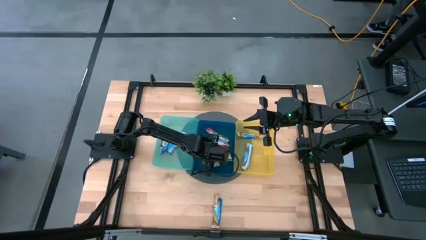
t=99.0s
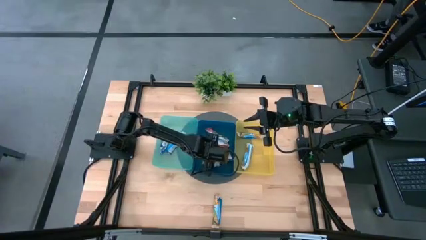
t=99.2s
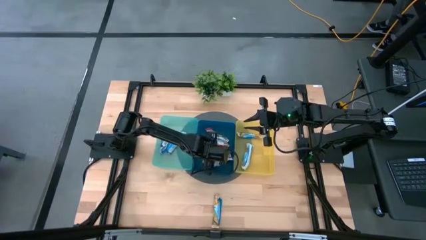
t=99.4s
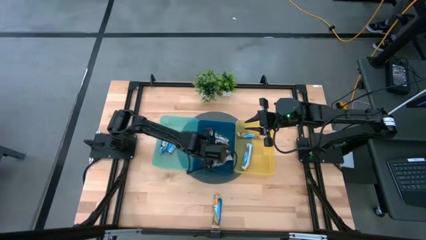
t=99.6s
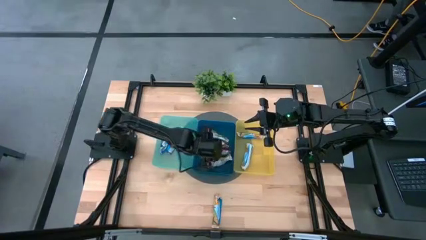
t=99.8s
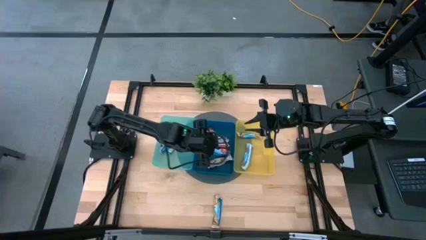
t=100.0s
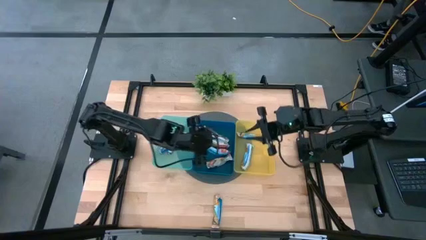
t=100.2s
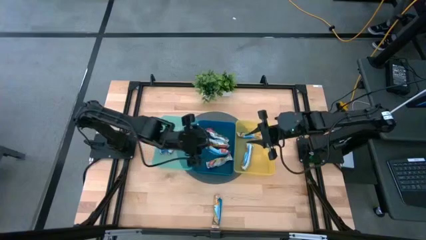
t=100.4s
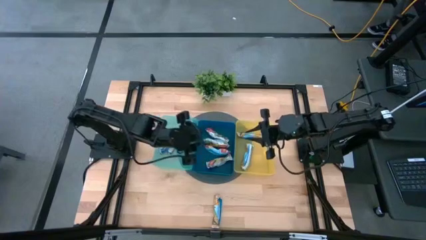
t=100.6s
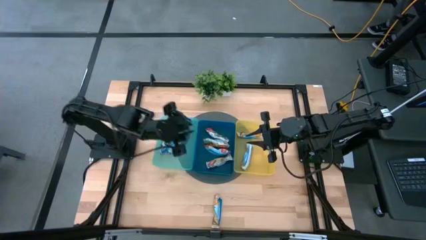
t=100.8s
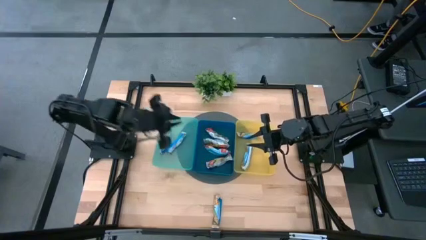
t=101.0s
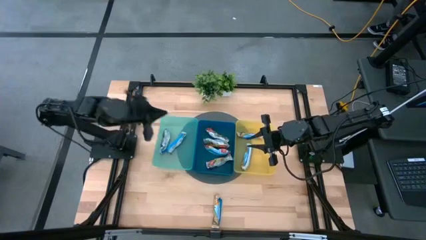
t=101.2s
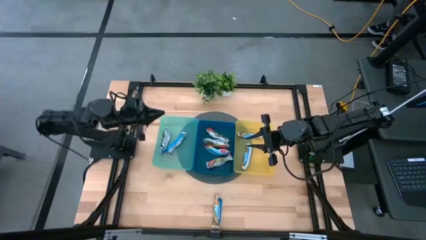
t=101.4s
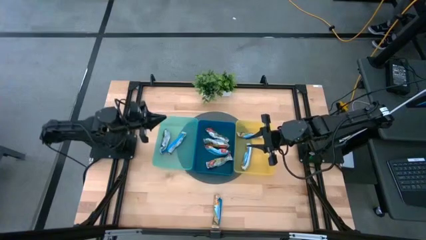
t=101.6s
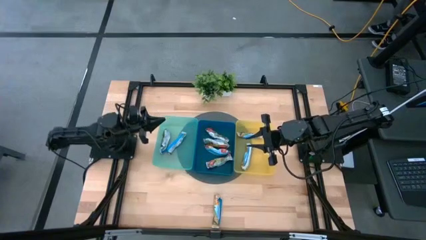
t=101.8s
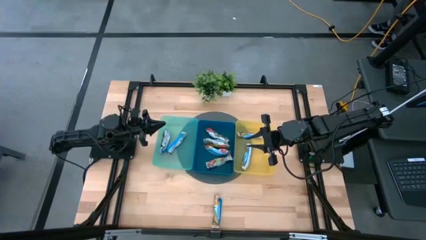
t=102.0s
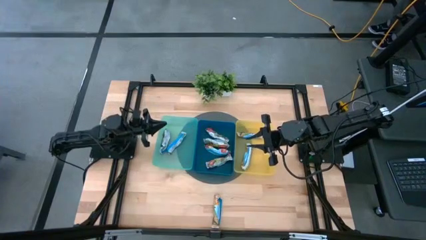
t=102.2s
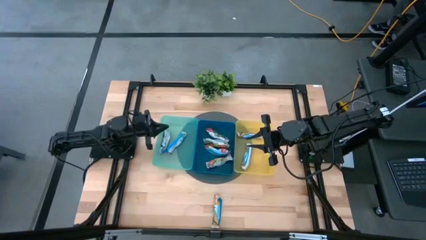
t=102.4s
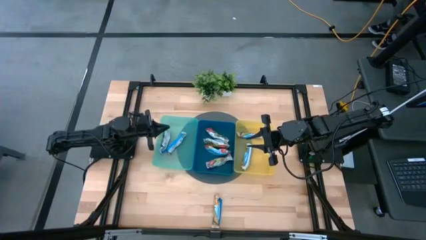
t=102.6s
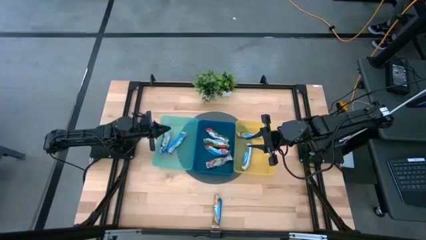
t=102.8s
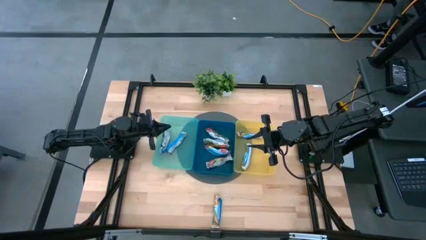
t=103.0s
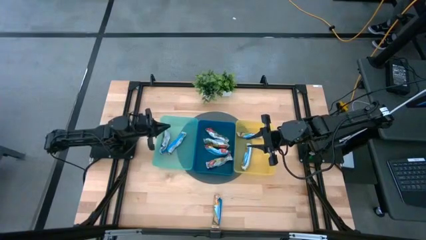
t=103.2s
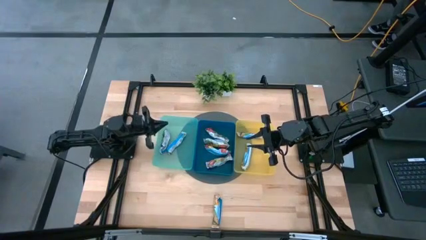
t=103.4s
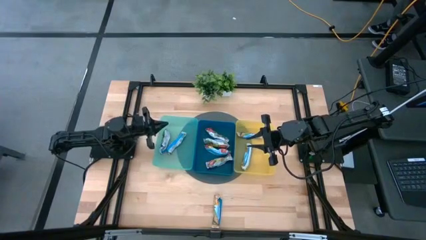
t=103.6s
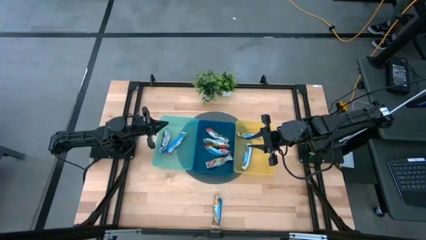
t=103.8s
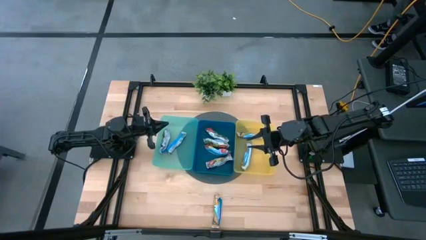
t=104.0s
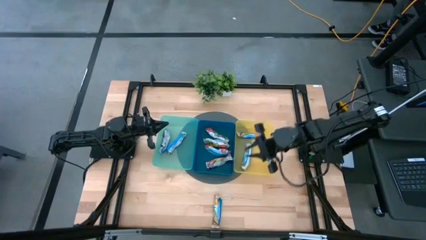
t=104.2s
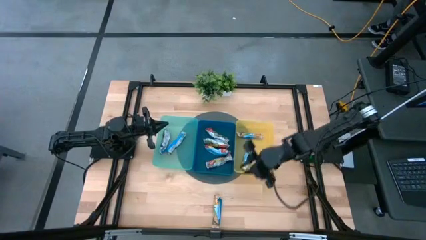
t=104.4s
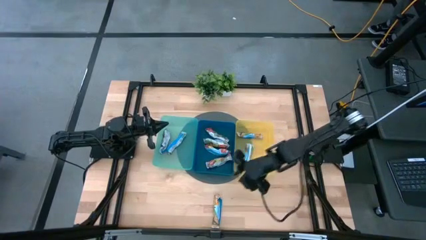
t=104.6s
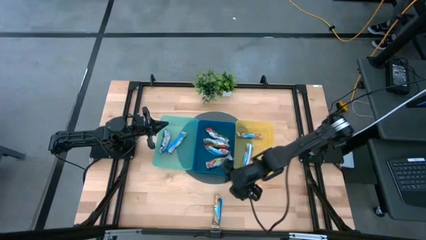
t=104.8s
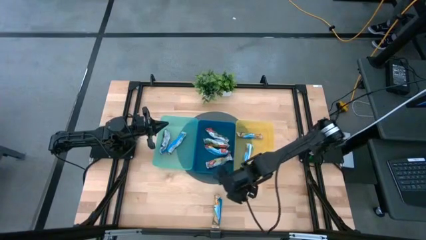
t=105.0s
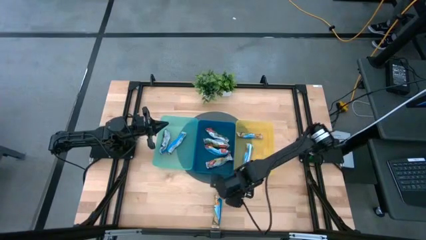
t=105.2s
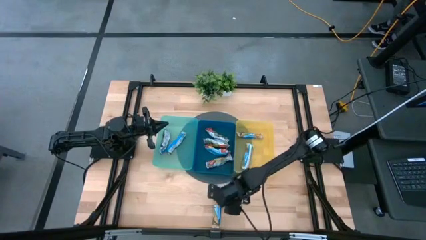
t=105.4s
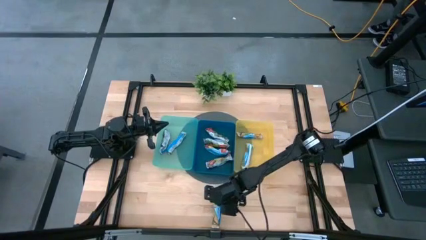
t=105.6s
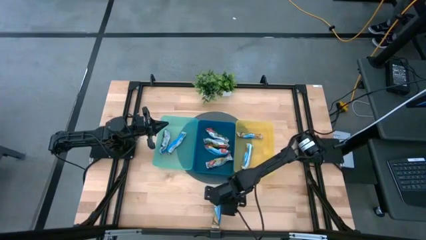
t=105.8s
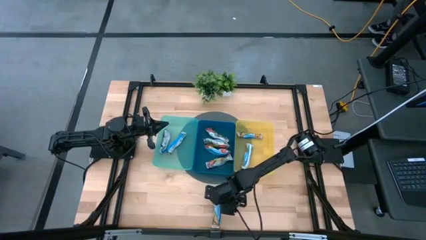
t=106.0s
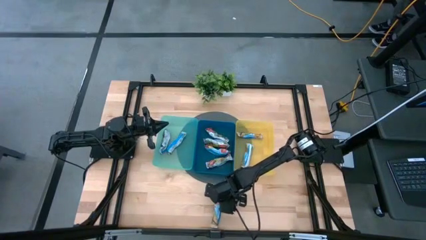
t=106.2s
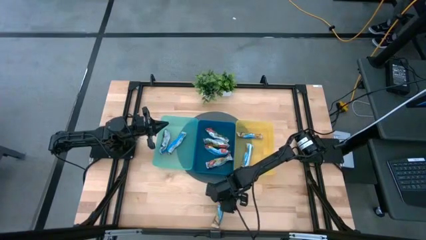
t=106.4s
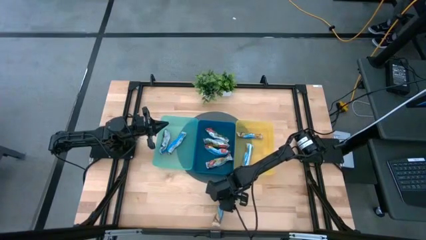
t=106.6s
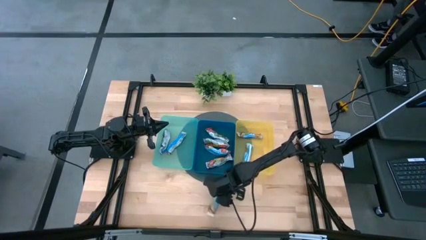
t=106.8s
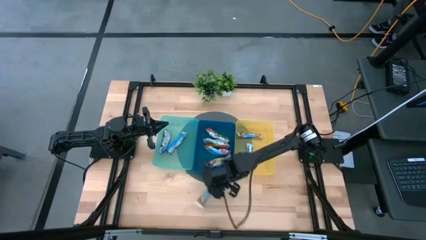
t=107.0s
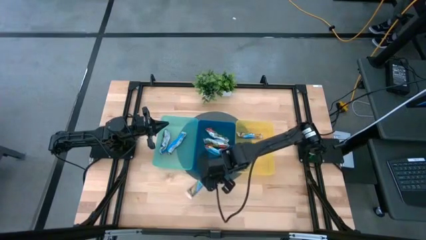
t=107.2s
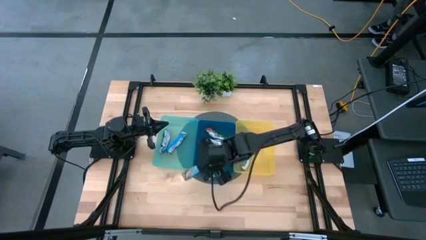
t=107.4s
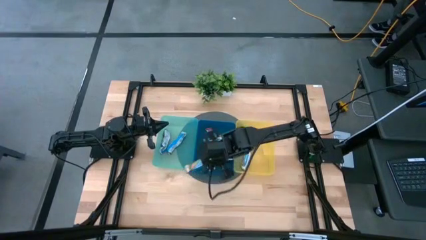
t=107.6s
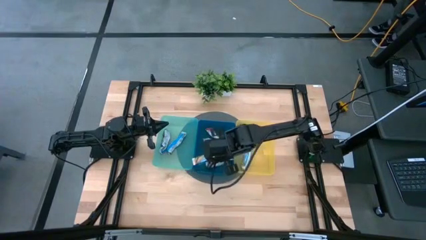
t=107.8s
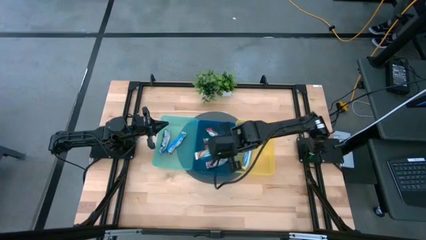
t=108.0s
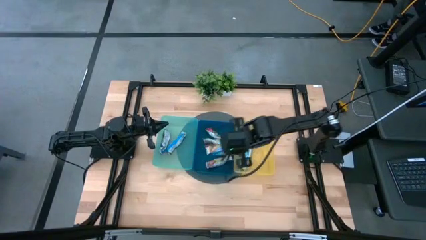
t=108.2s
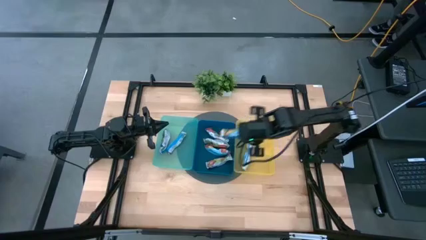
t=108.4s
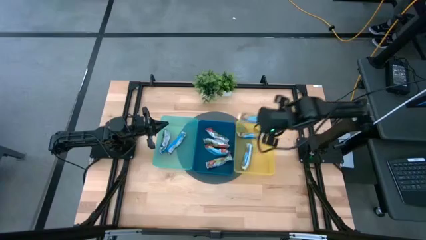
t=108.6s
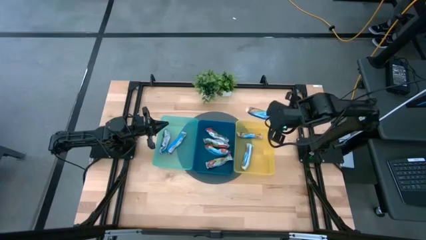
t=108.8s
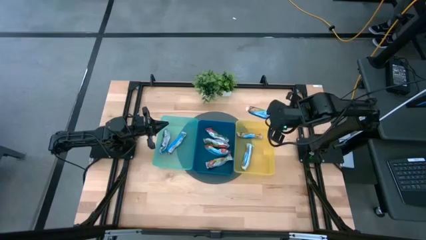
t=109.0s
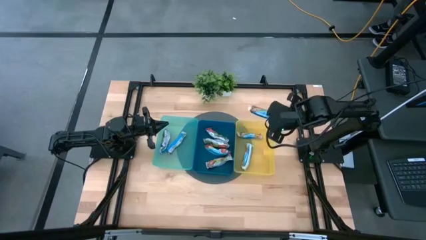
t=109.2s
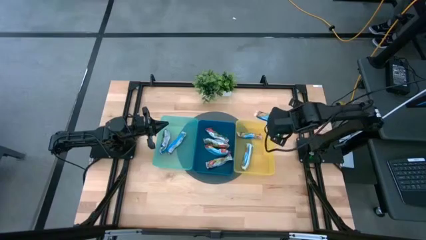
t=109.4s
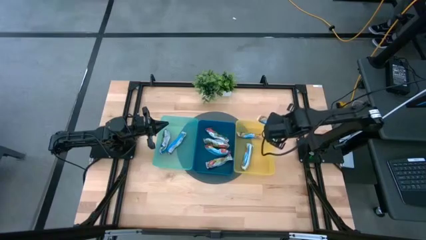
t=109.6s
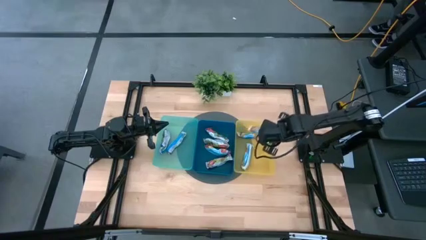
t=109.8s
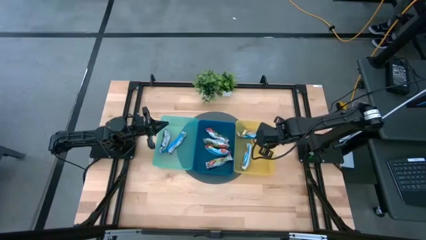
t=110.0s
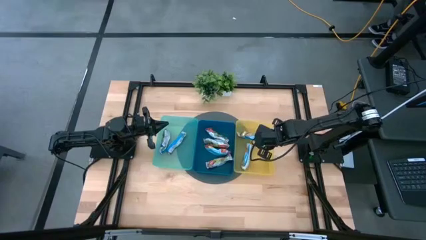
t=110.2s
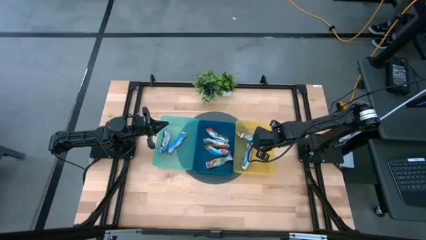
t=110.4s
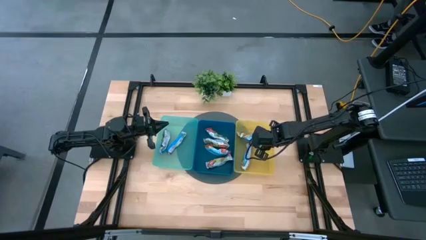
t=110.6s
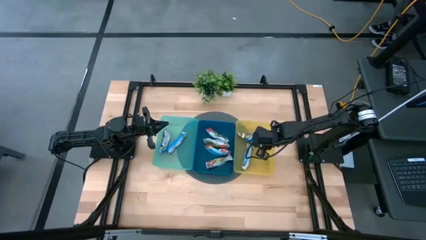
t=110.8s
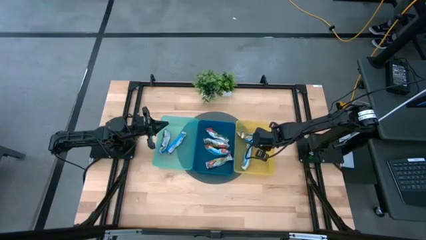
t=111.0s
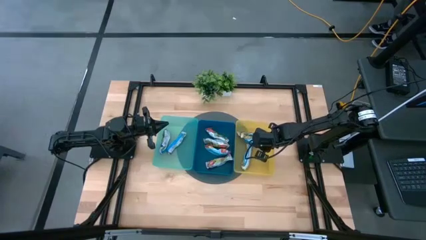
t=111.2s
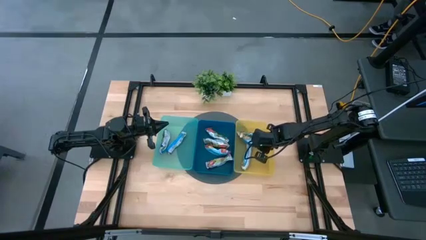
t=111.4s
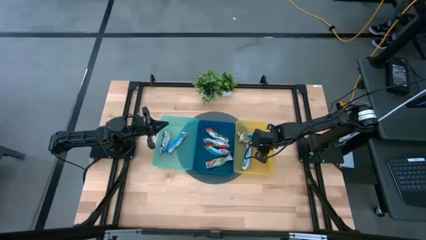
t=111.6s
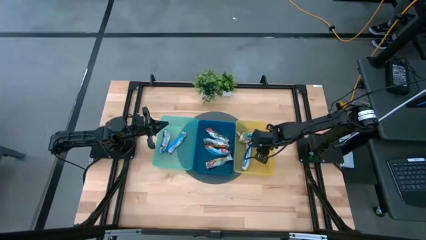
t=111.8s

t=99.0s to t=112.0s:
Task: Pick and place Granola Bars by type
Put the yellow granola bar into the yellow bin
